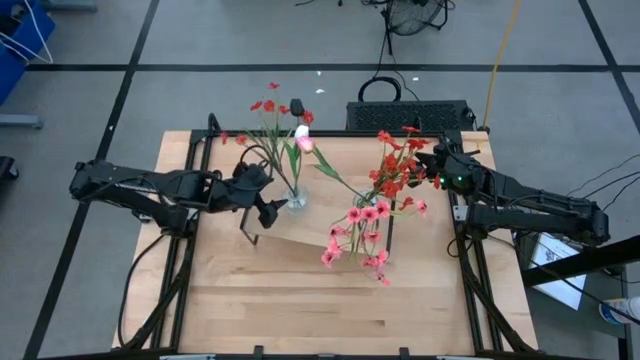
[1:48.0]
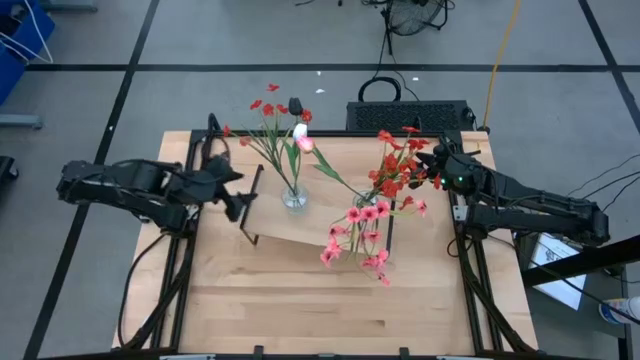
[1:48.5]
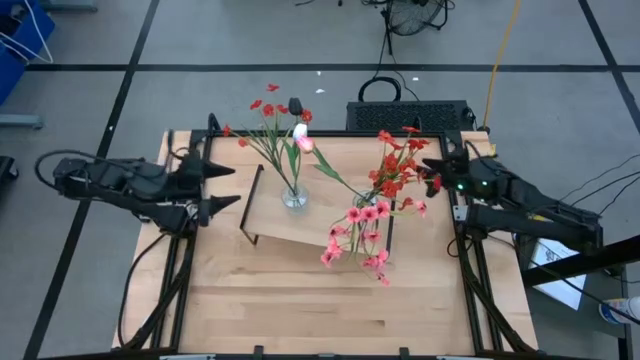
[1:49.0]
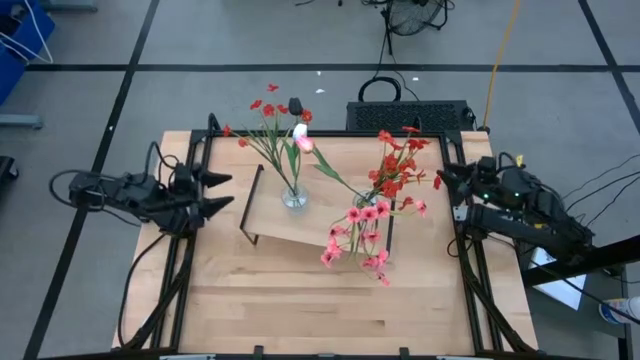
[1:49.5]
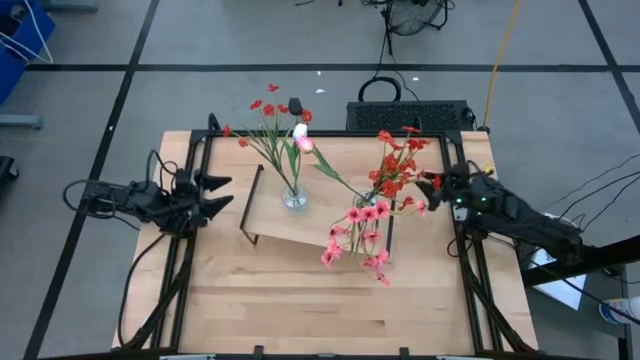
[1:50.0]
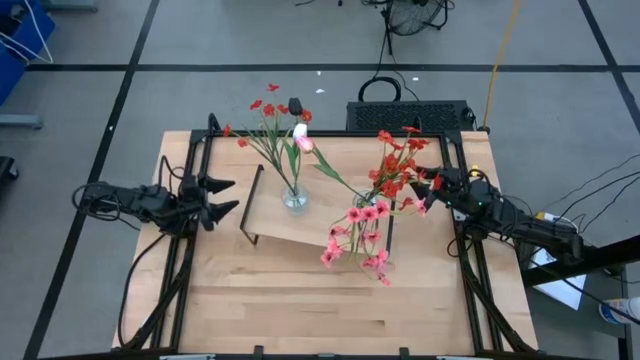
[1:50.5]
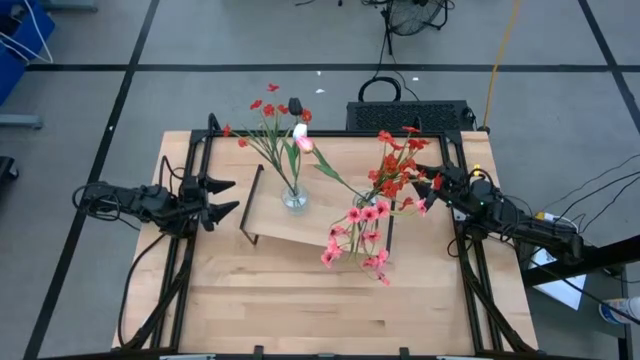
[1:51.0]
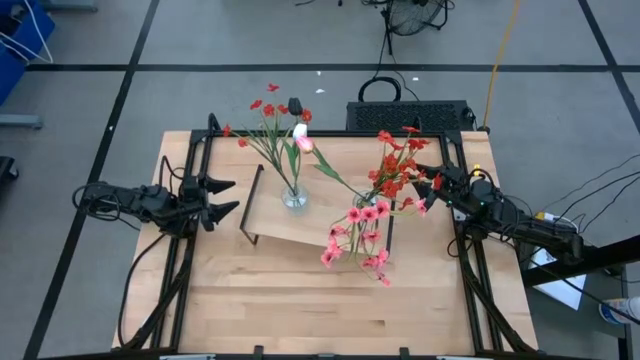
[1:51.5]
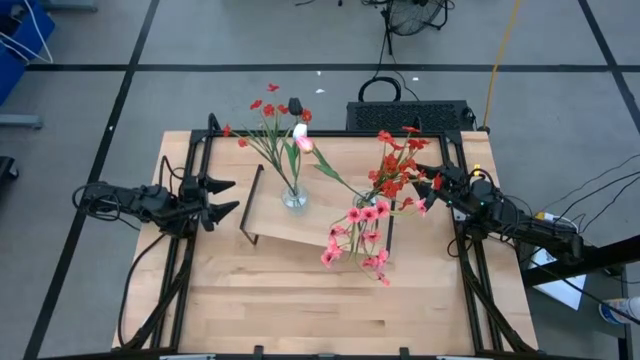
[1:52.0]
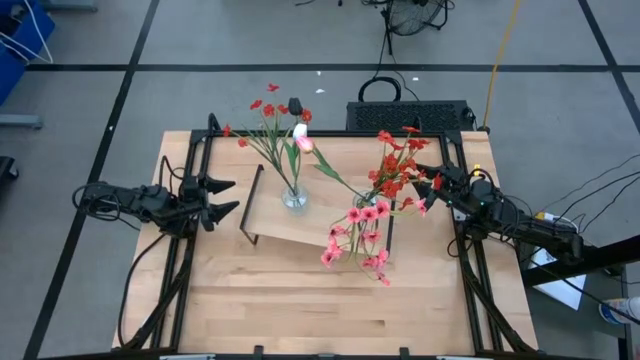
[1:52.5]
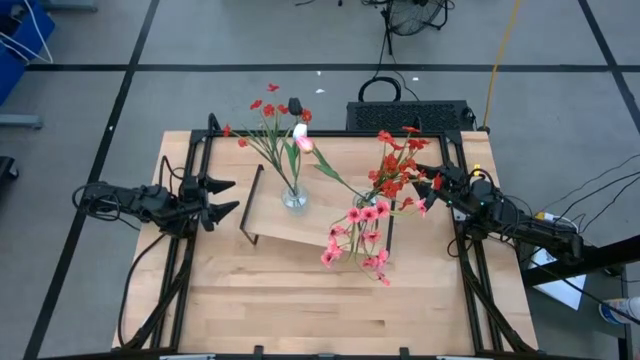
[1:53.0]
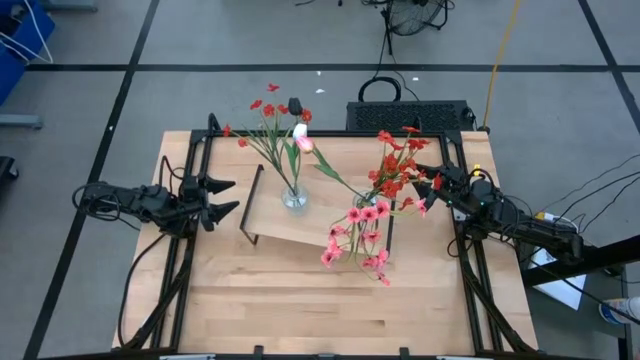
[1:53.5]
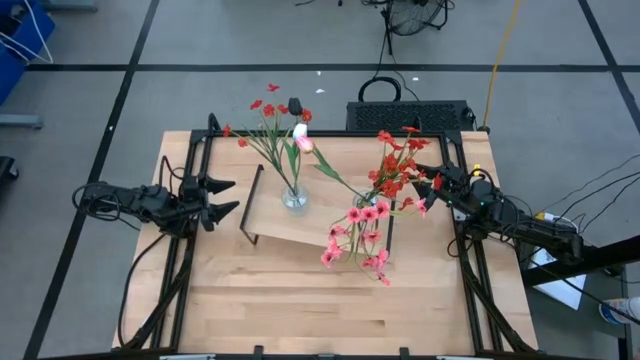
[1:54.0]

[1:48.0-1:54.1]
Task: Pick and place flowers into a vace then onto a shelf
Return to home position

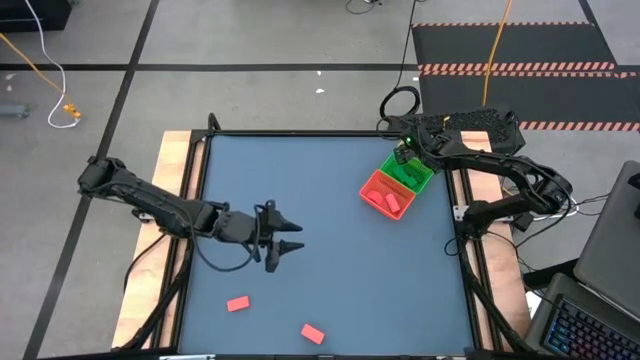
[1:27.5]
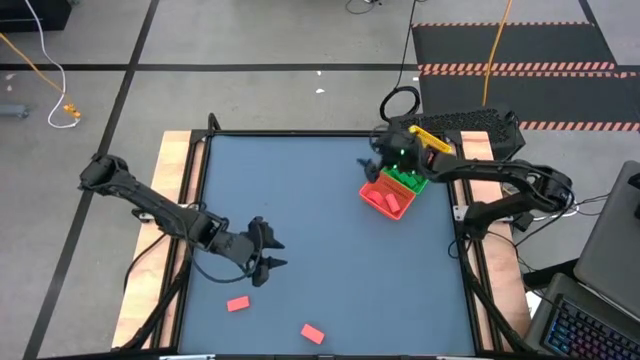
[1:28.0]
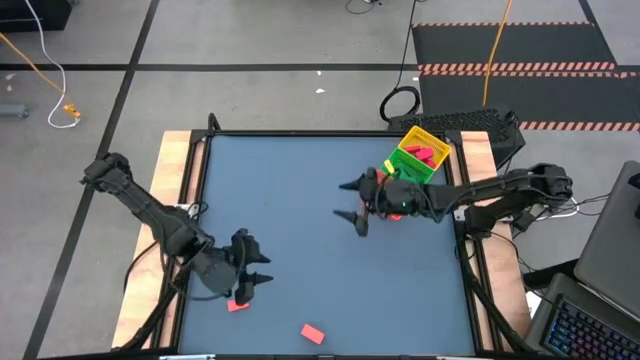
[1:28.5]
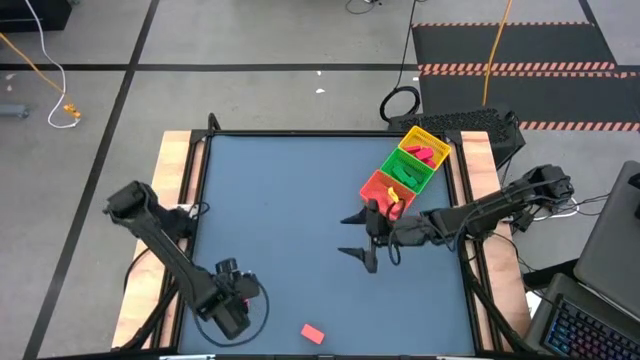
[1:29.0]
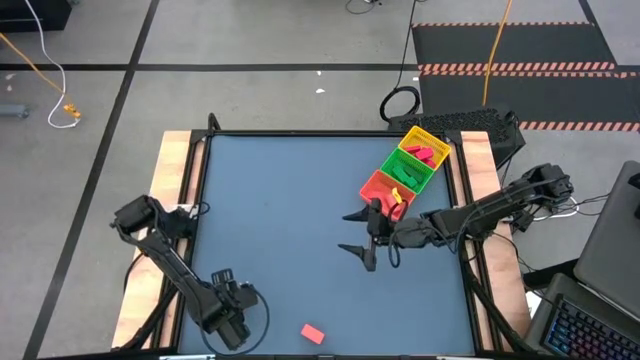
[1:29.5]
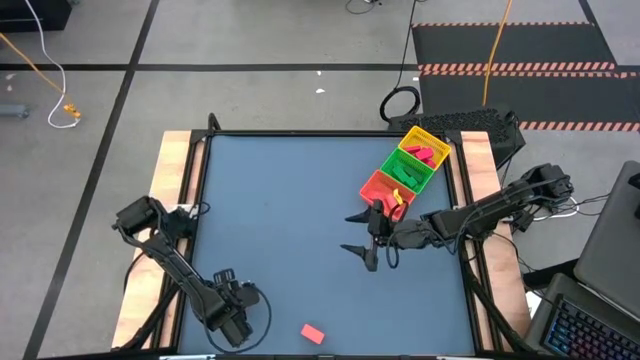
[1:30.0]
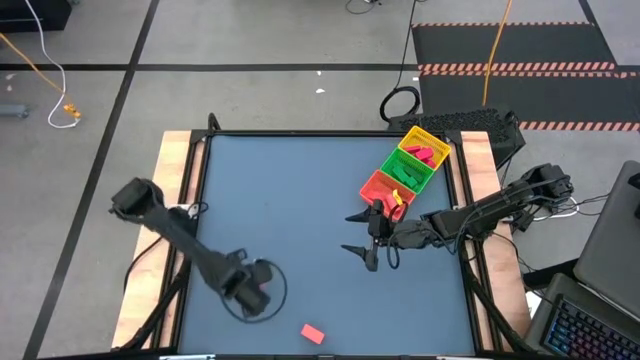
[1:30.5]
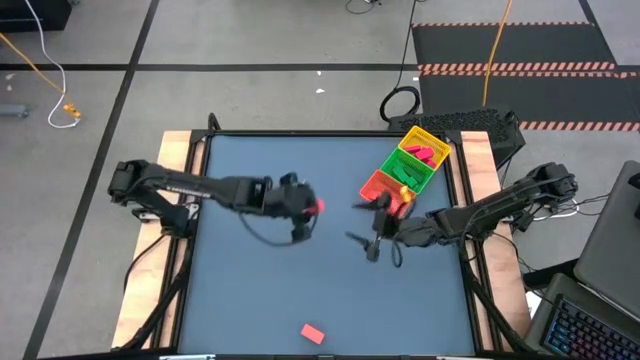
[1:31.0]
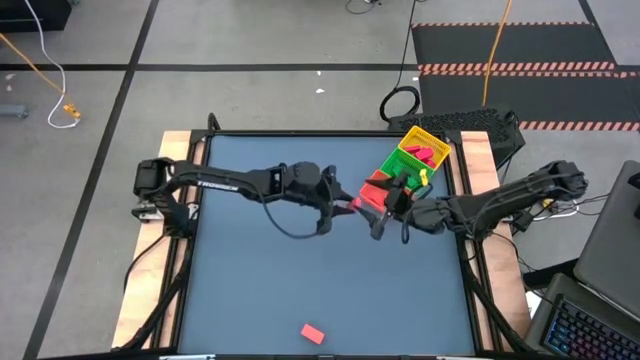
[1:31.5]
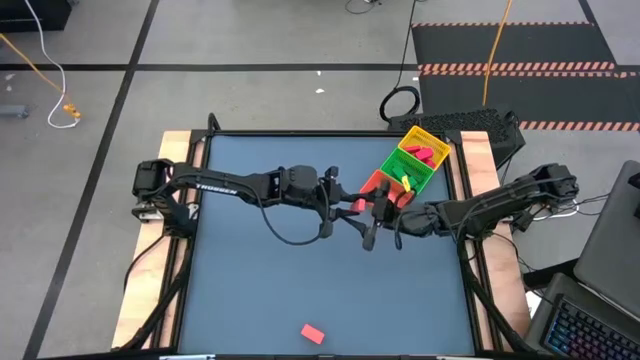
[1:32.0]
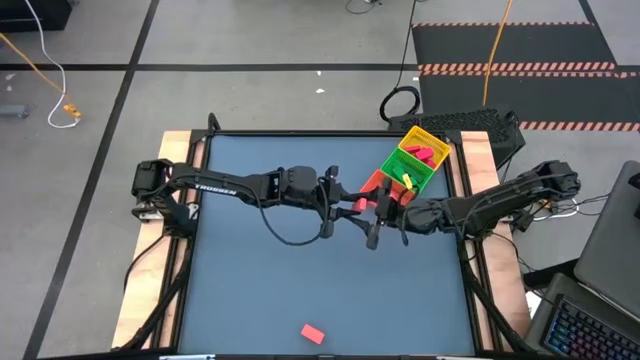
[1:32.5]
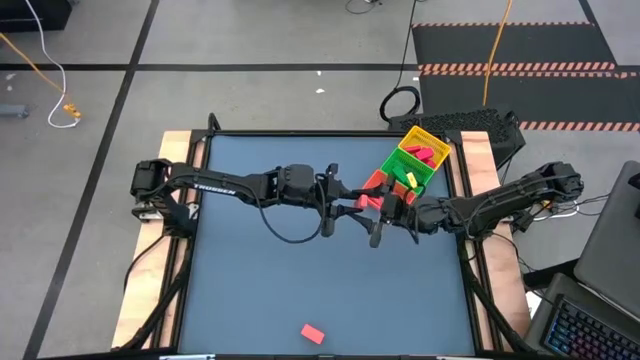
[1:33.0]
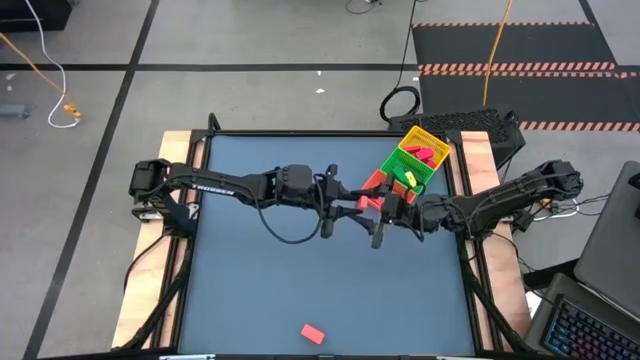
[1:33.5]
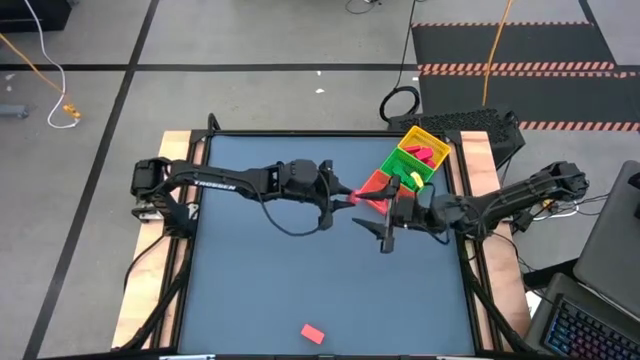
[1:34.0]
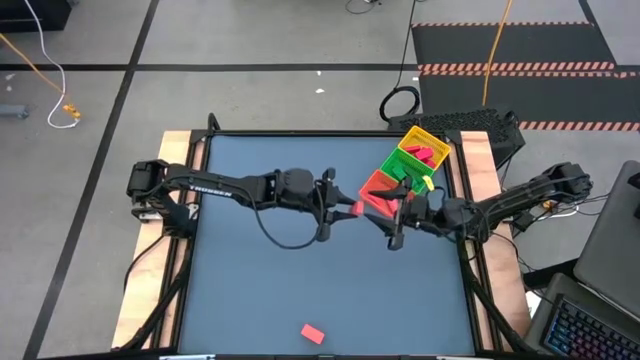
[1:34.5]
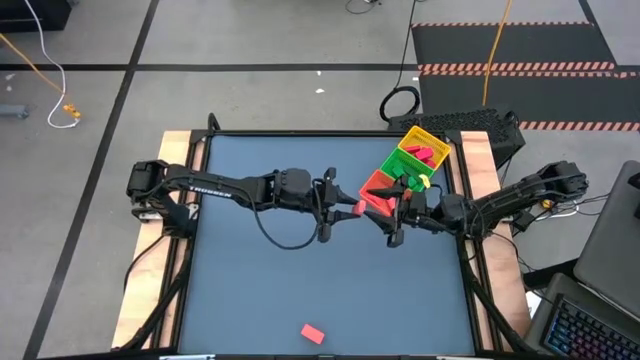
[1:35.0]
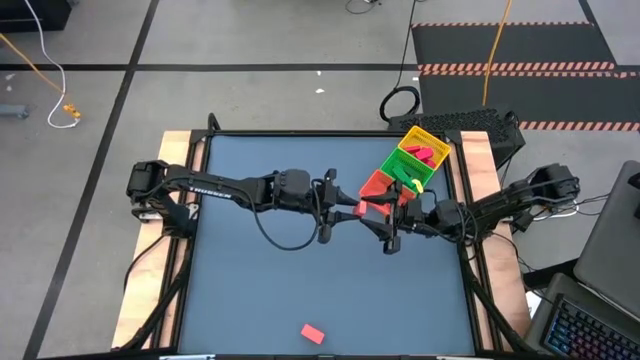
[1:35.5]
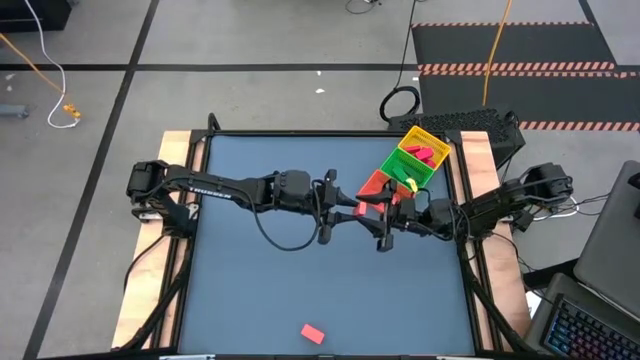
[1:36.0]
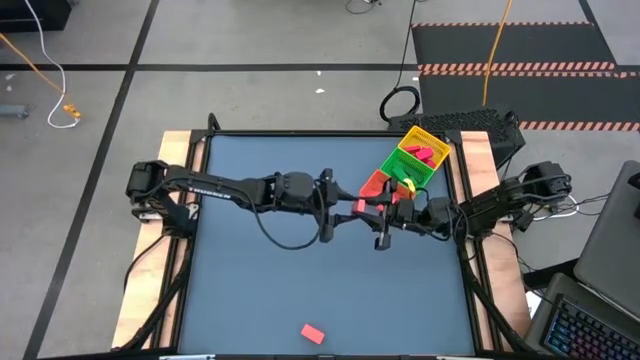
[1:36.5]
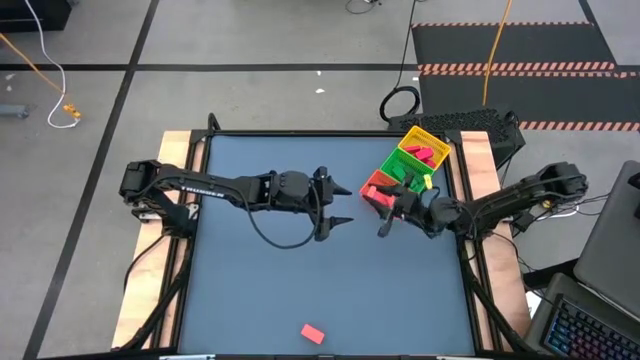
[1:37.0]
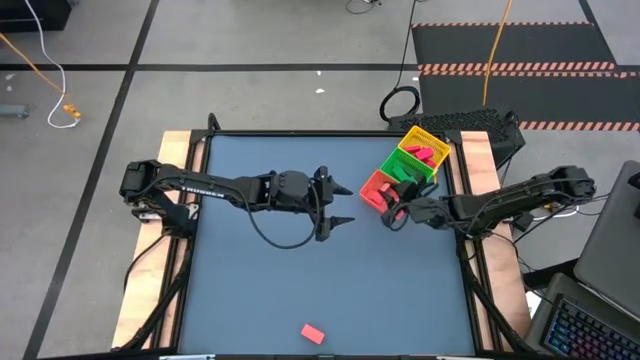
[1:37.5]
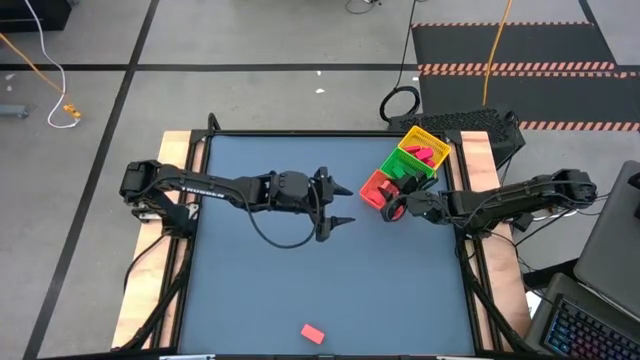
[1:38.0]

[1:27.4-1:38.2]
Task: Sort & place blocks by color
Put the orange block into the orange bin

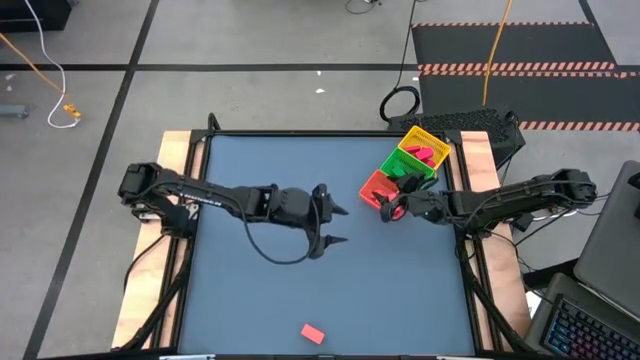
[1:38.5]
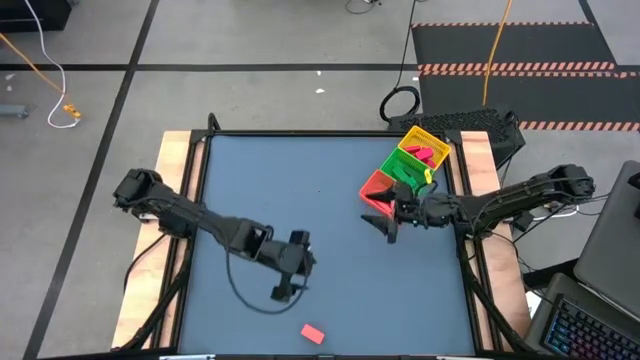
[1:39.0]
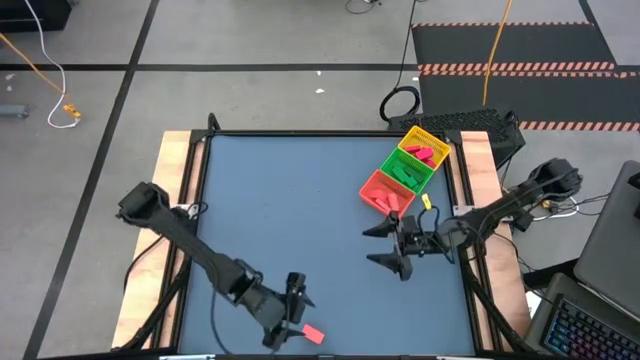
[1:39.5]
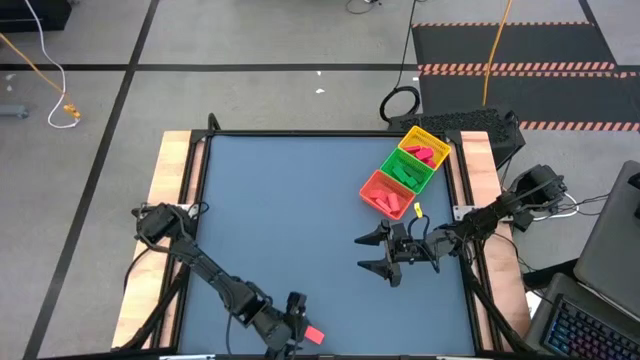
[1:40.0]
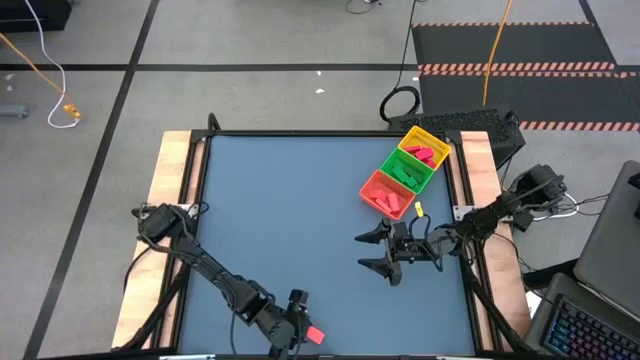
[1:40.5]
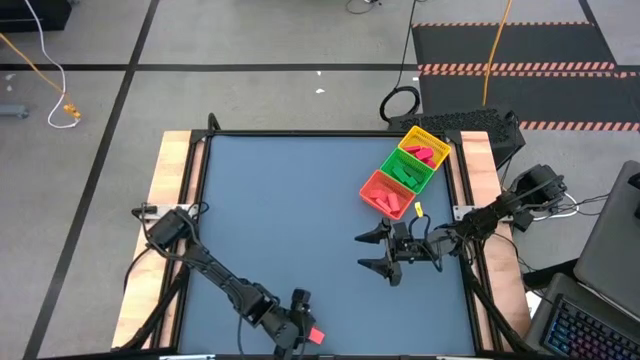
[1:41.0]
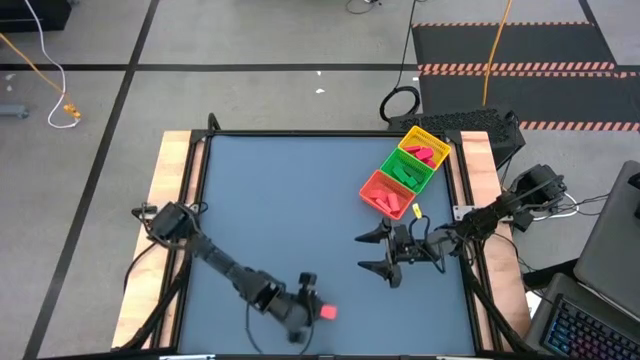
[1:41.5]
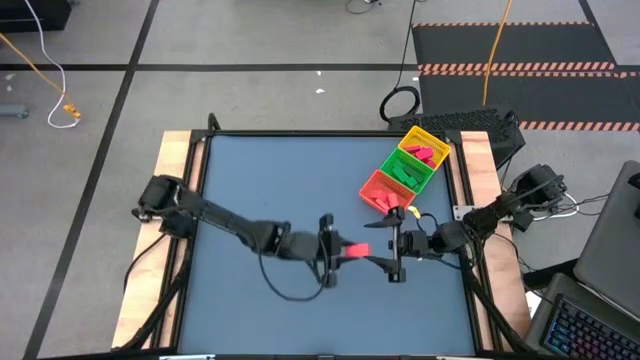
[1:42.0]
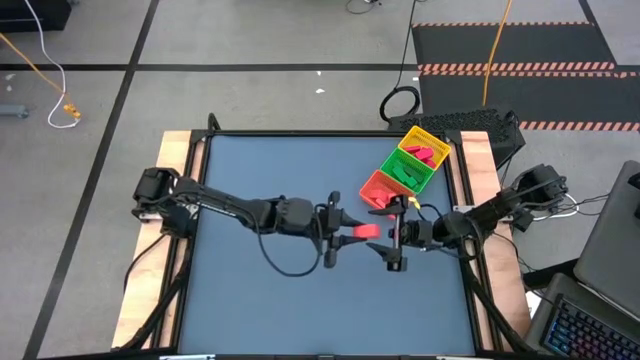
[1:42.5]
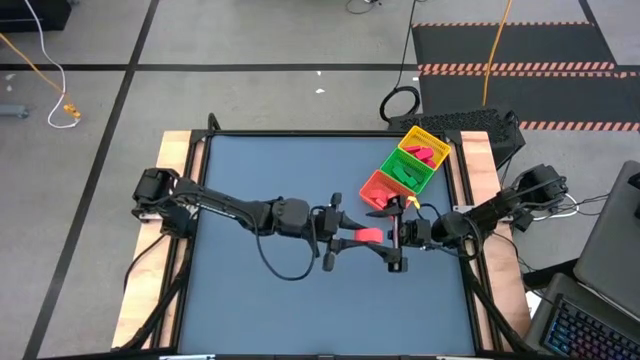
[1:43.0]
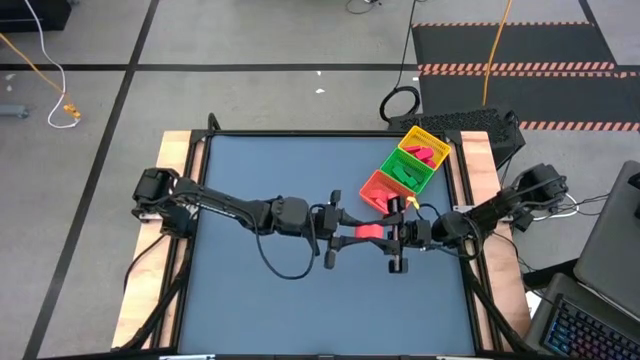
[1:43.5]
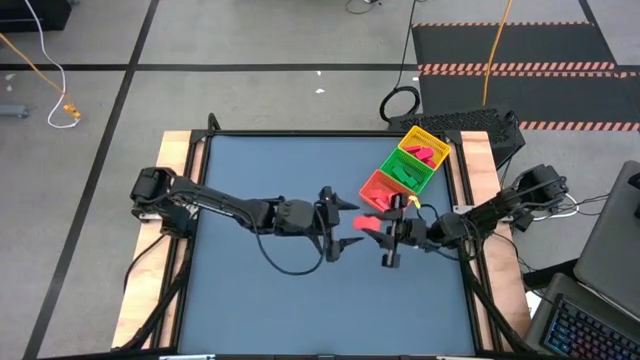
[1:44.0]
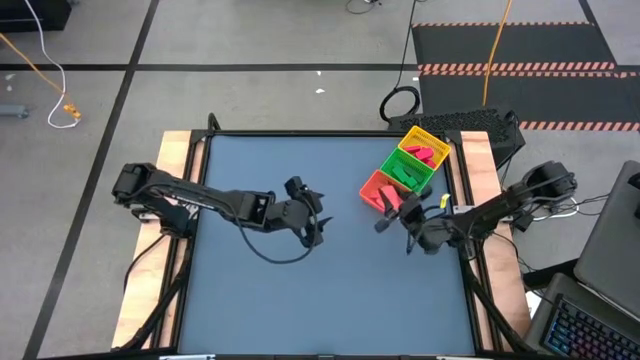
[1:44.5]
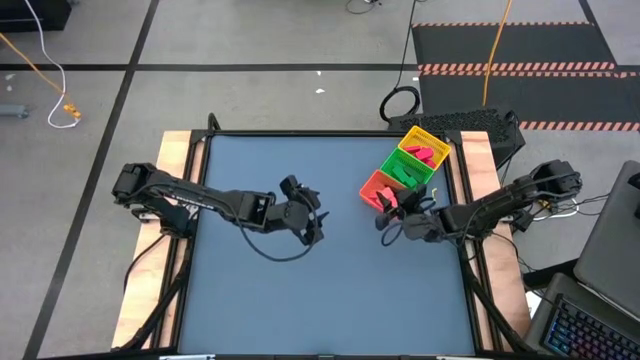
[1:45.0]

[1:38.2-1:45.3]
Put the orange block into the orange bin
